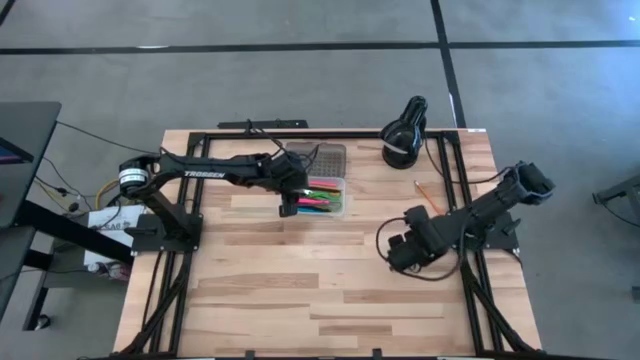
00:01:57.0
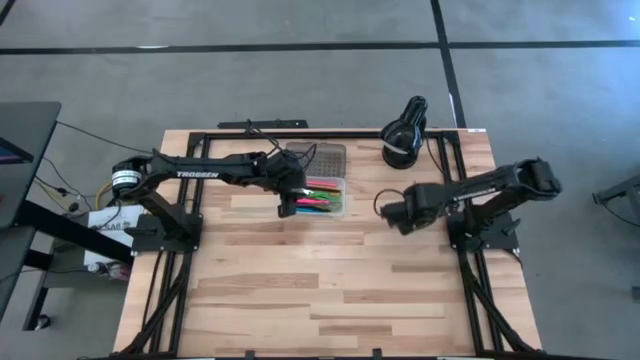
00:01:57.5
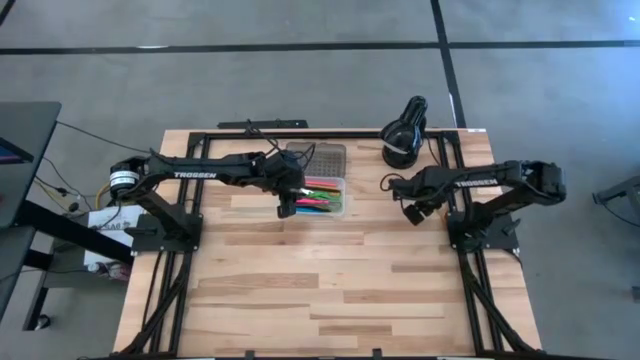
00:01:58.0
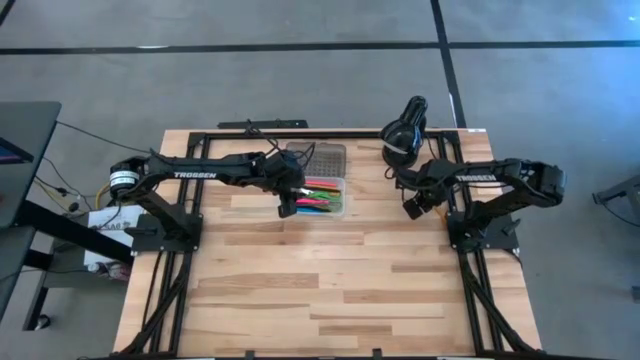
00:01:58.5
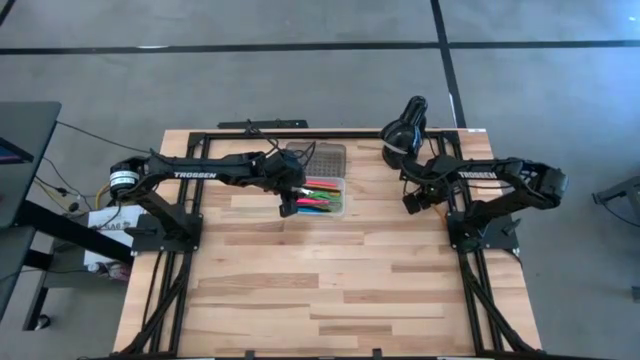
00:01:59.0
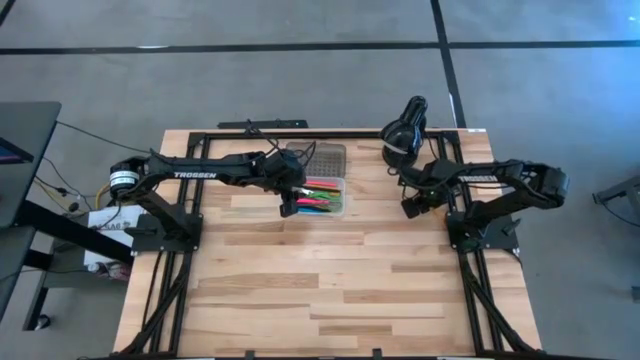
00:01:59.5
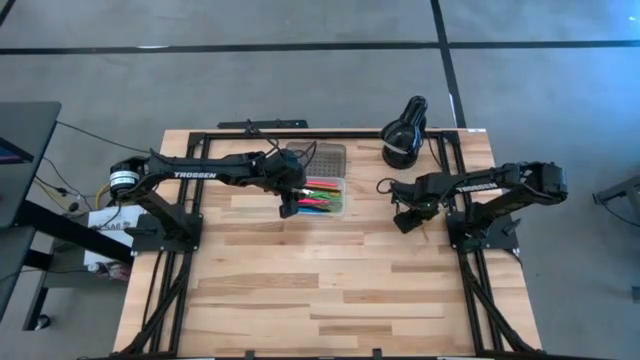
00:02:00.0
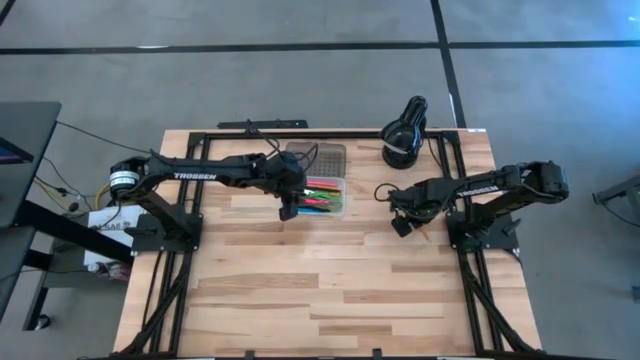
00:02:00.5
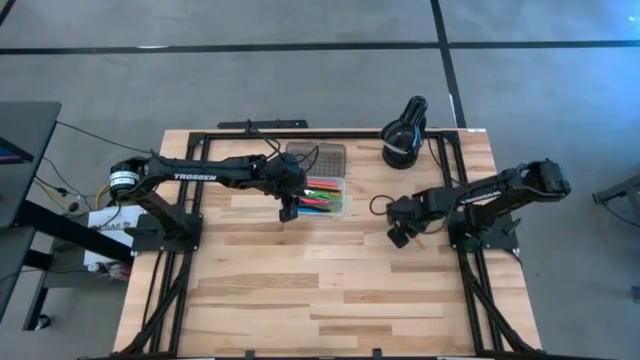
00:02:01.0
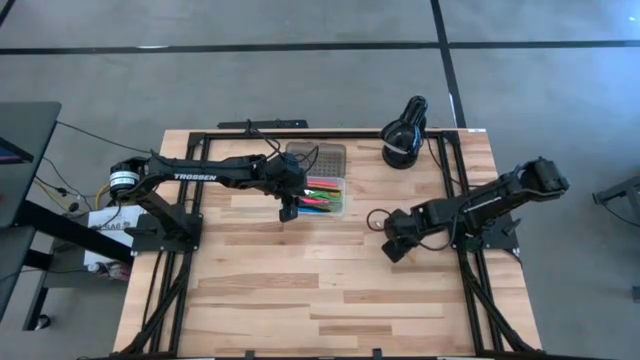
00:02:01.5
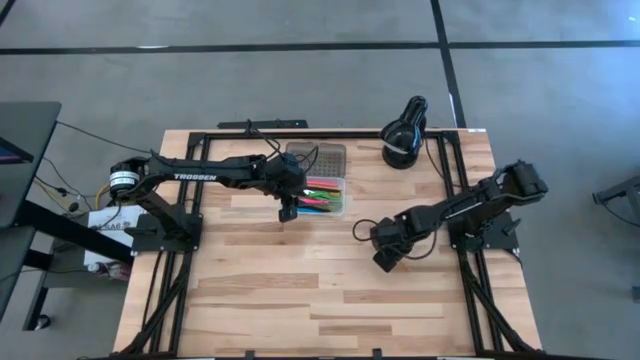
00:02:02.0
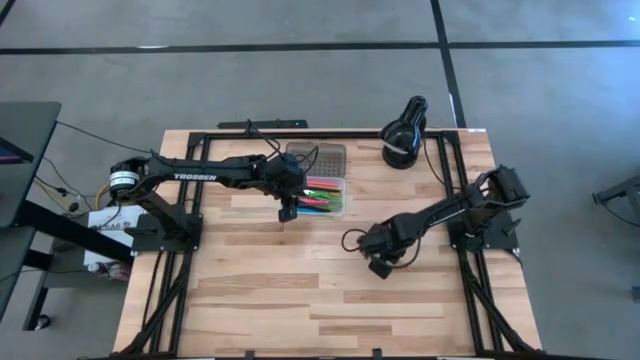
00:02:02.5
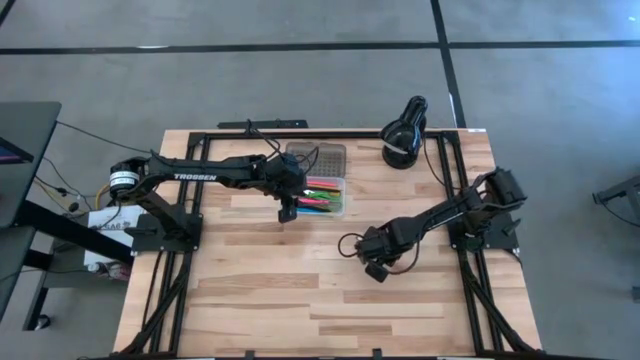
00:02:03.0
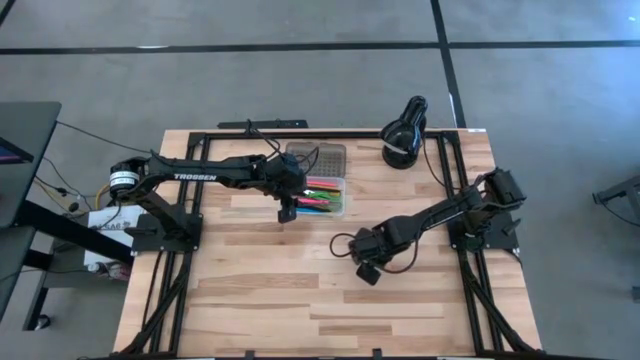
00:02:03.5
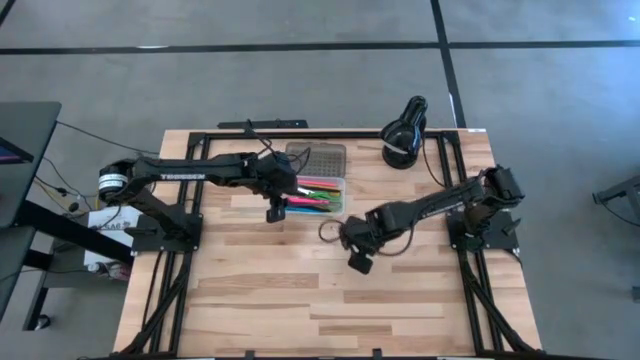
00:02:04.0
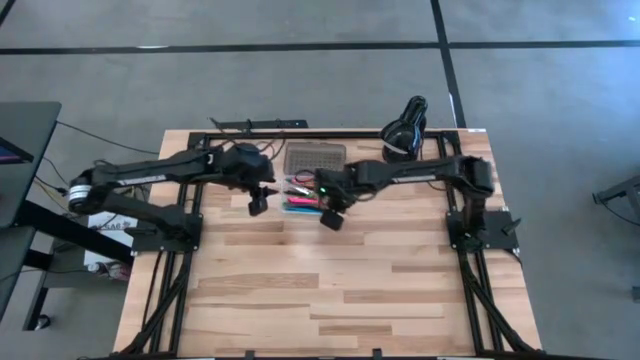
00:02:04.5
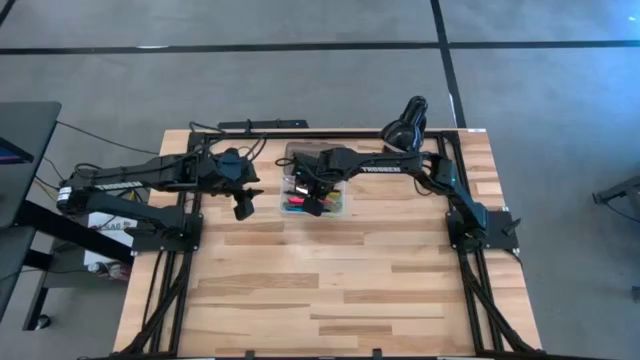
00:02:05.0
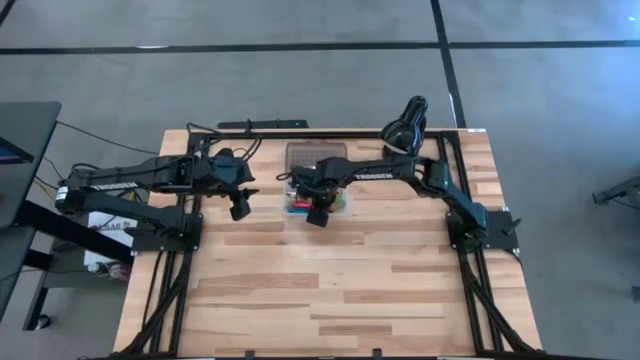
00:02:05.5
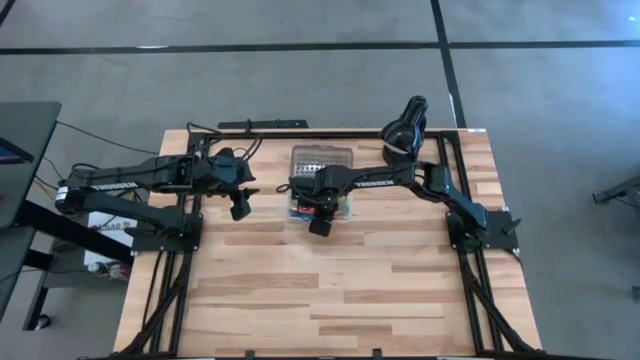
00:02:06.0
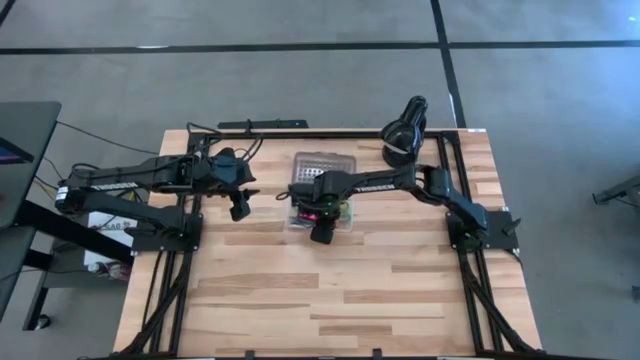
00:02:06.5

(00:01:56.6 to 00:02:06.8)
Task: Pick & place school supplies into a supply box
Put the orange pencil into the supply box

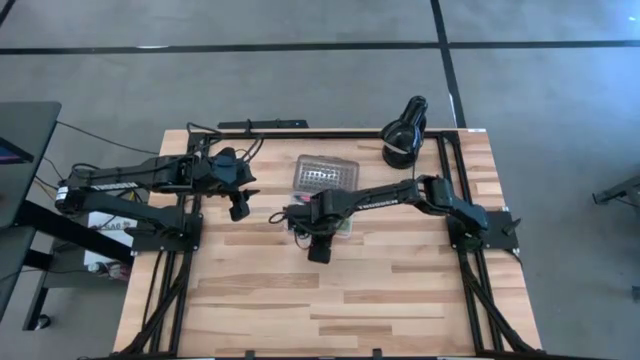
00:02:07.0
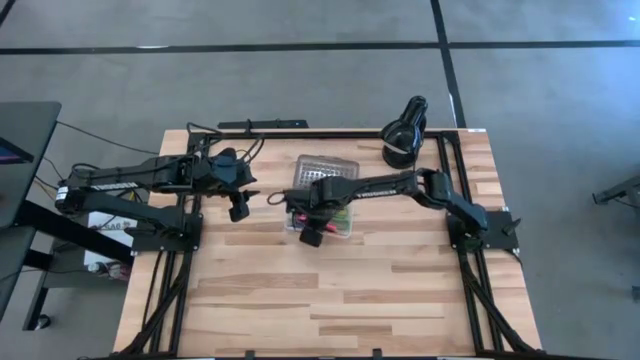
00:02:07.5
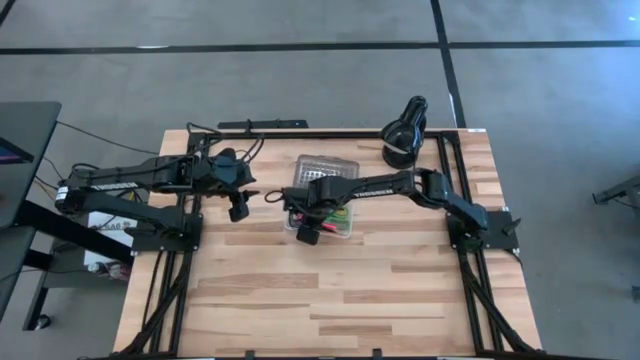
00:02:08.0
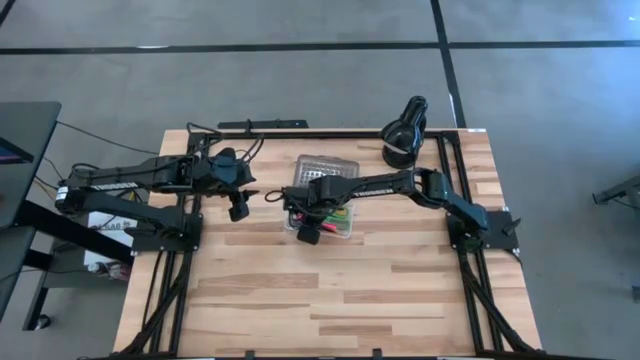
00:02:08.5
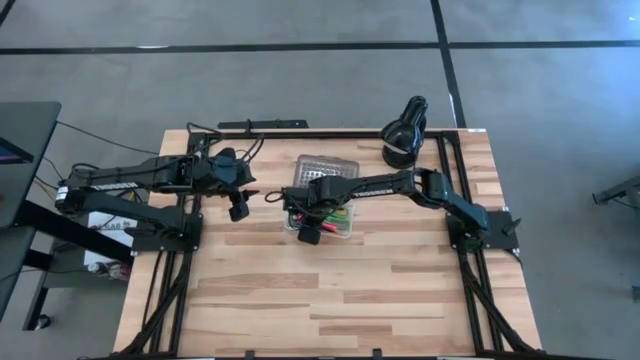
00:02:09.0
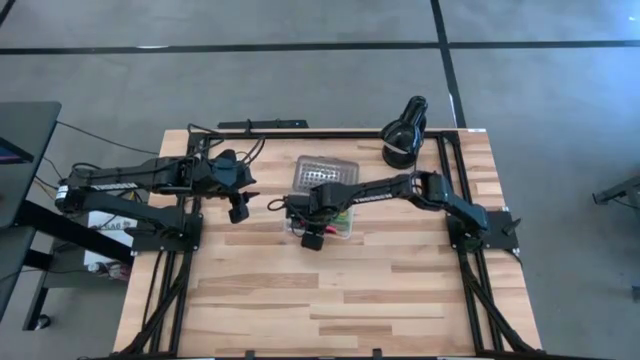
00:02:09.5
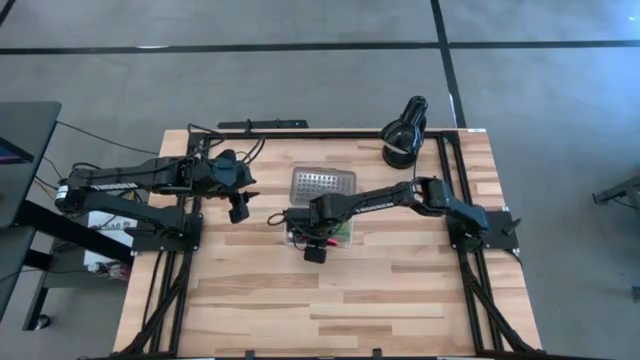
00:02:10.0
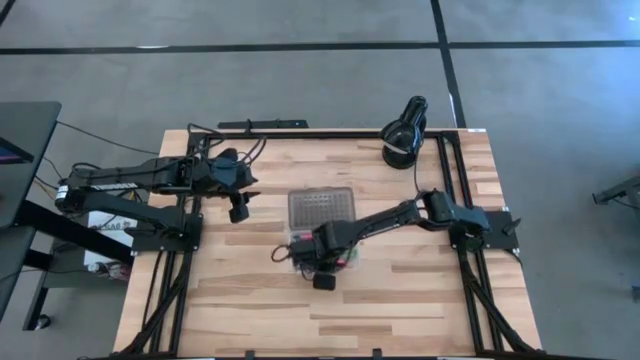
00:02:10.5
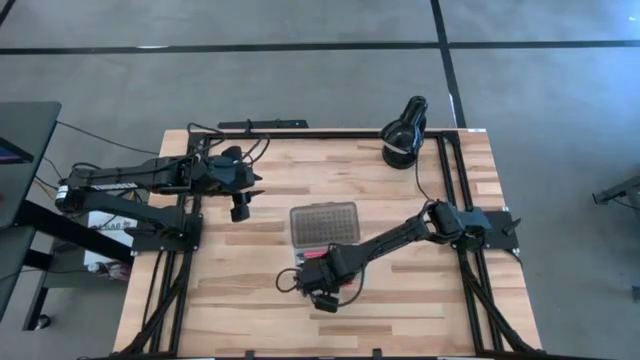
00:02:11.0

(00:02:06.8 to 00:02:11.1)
Move the supply box to the center of the table

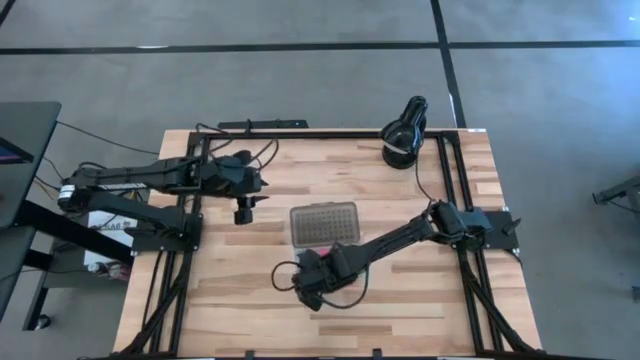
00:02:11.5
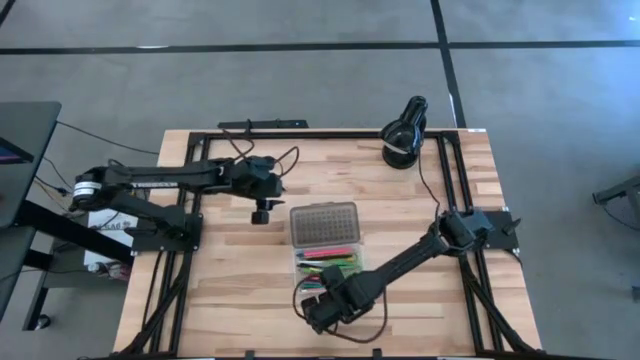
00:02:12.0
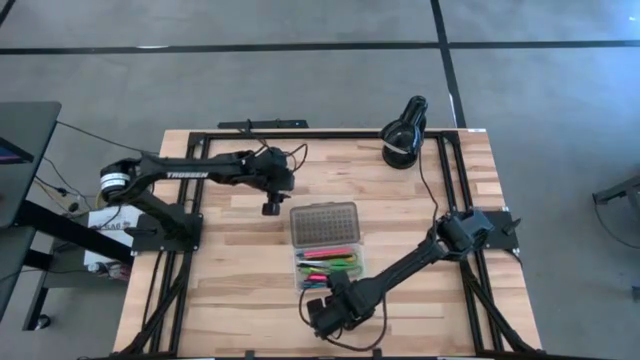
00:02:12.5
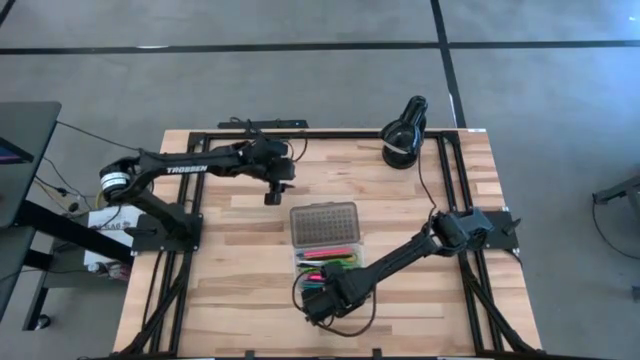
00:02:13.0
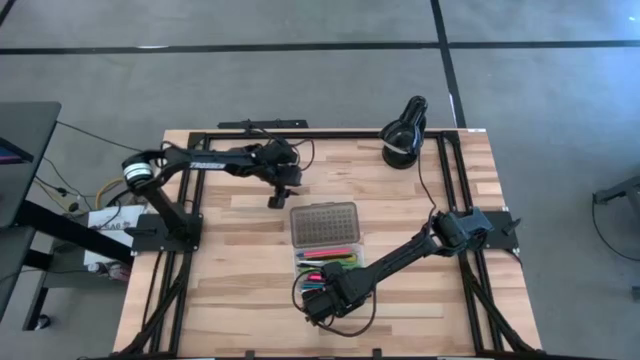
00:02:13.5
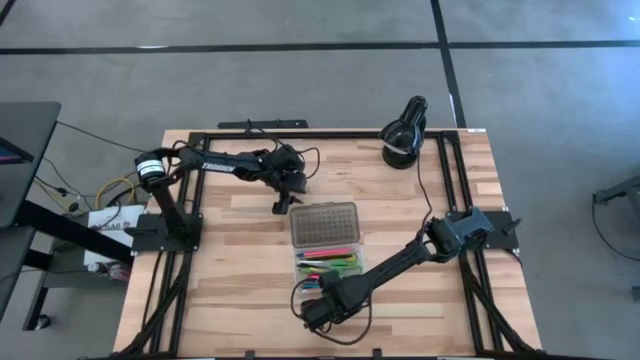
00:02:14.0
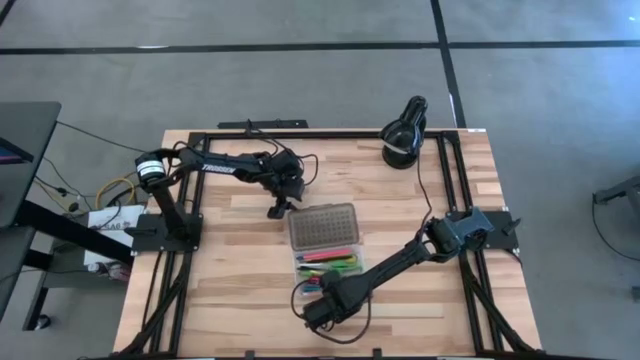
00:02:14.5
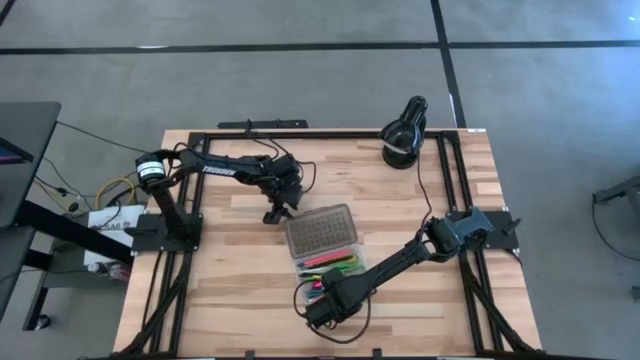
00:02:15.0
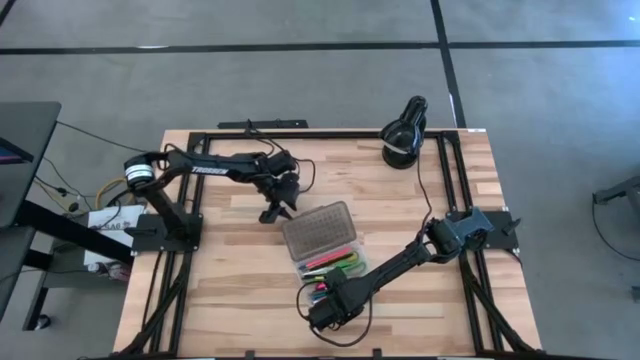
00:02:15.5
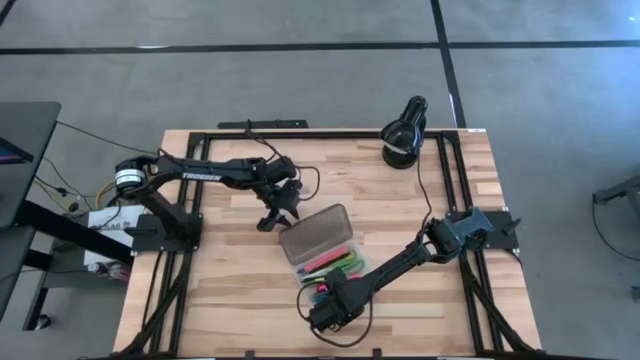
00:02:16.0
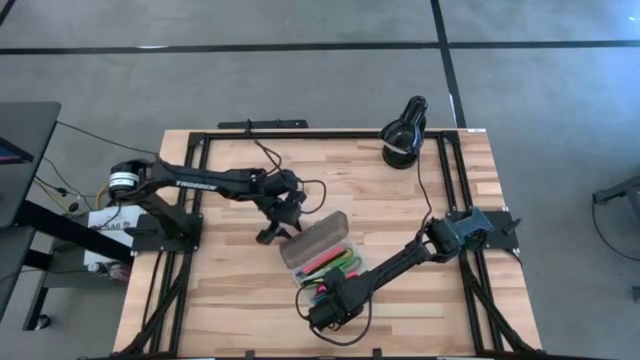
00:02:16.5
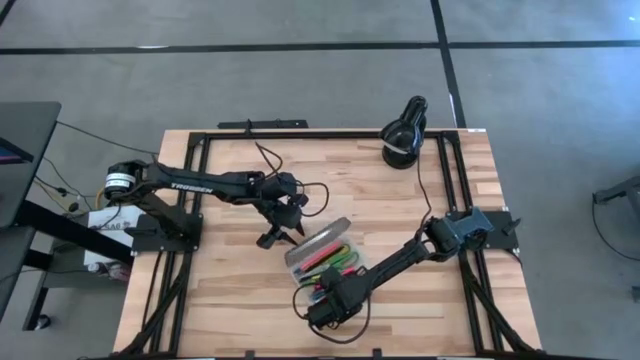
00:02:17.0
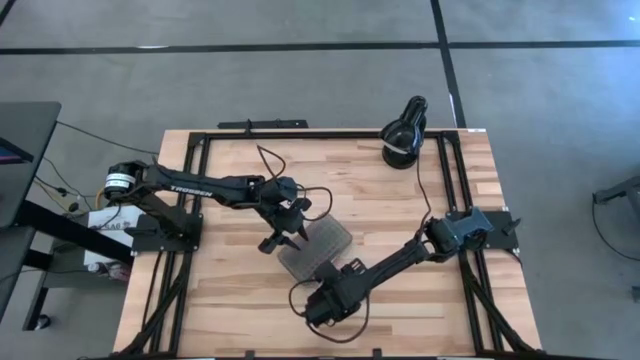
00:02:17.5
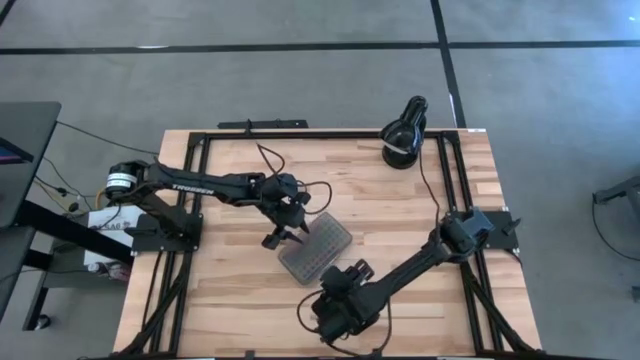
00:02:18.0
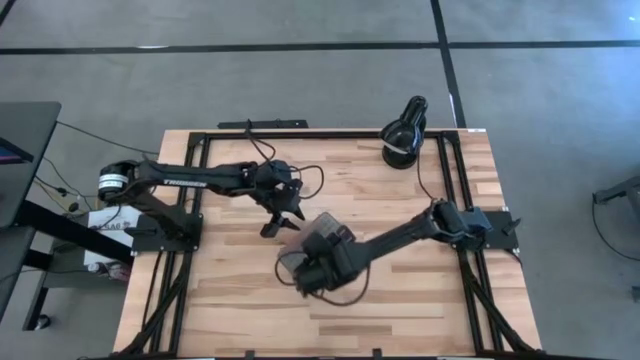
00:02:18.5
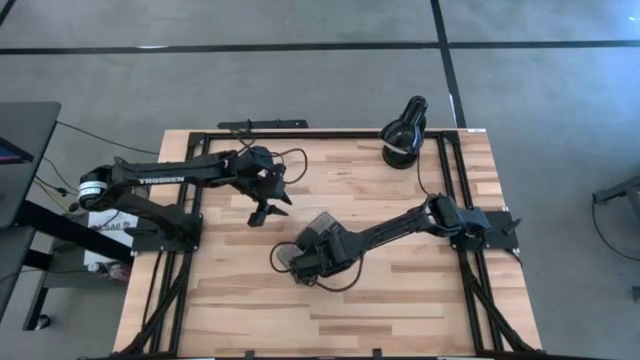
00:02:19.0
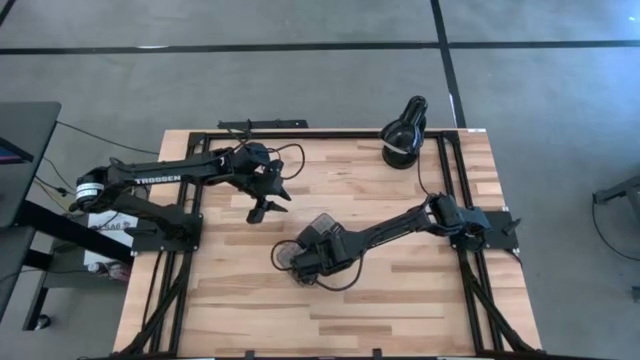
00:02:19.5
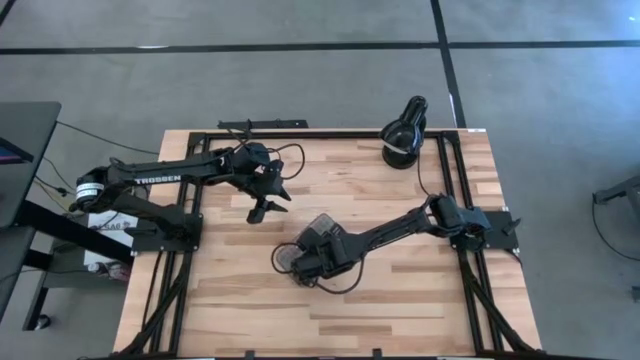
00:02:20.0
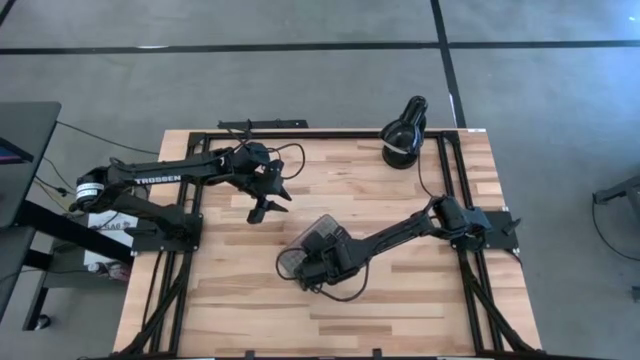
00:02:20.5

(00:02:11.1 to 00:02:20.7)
Close the supply box
